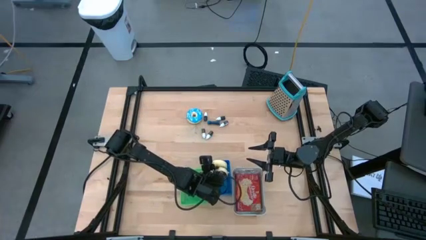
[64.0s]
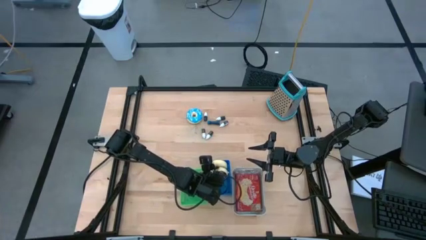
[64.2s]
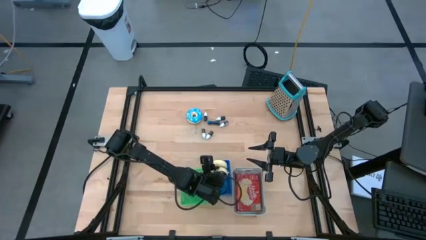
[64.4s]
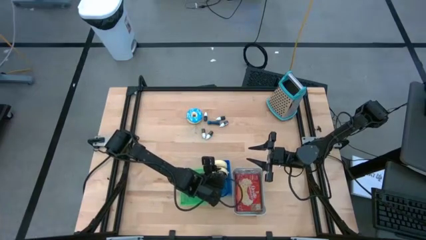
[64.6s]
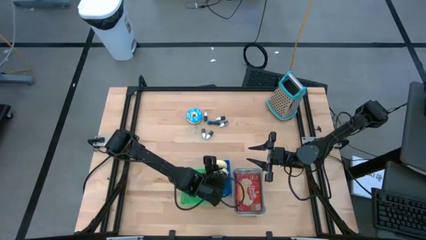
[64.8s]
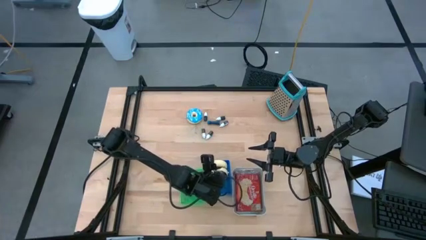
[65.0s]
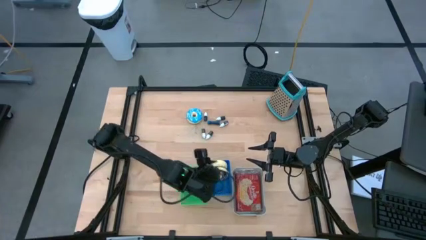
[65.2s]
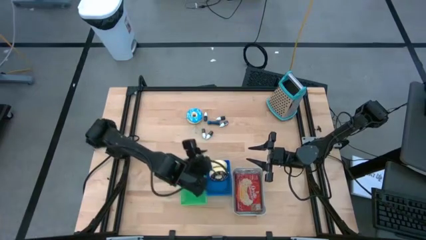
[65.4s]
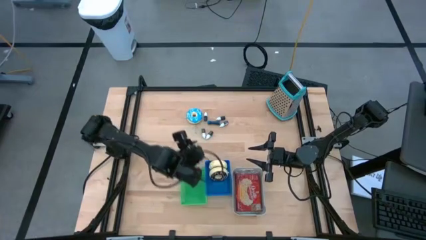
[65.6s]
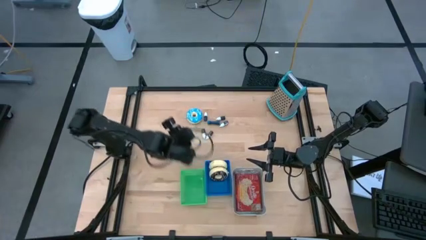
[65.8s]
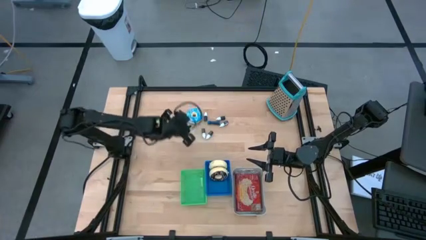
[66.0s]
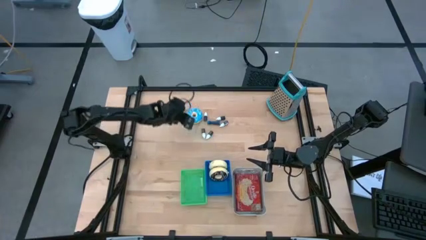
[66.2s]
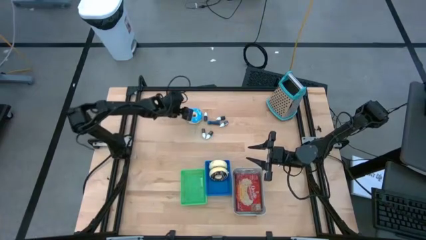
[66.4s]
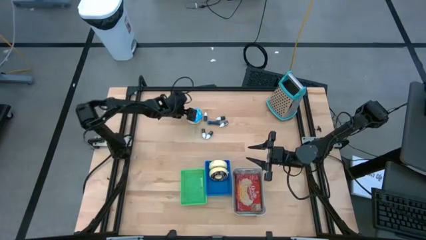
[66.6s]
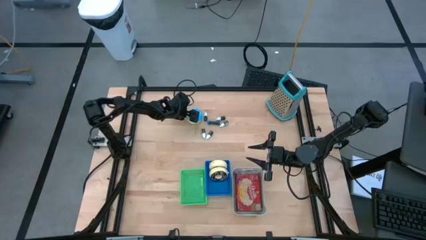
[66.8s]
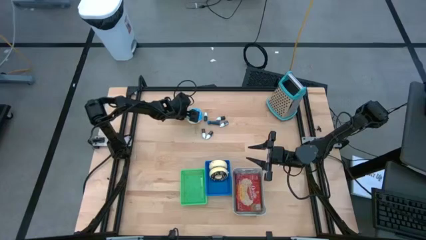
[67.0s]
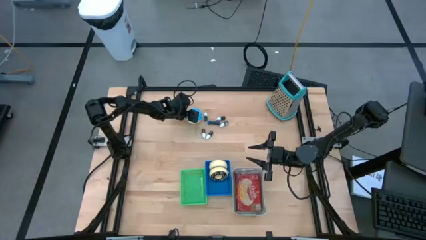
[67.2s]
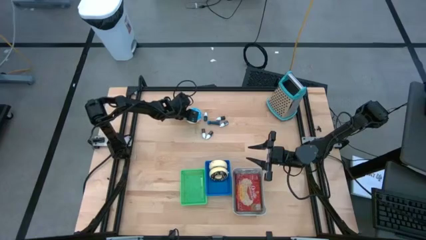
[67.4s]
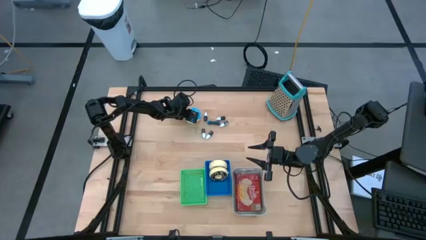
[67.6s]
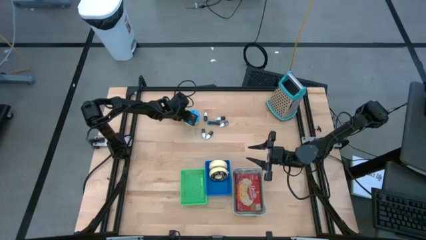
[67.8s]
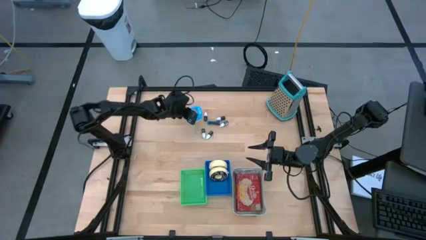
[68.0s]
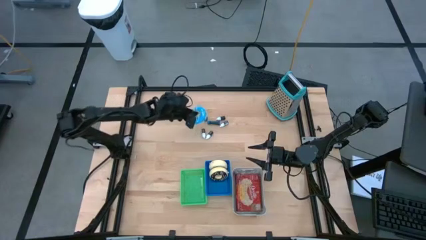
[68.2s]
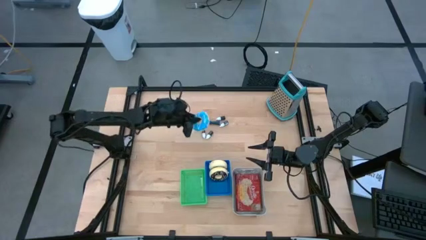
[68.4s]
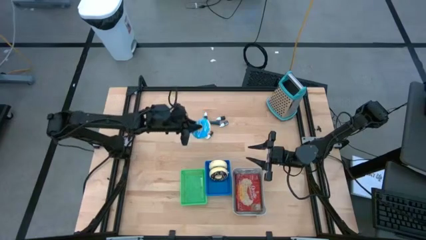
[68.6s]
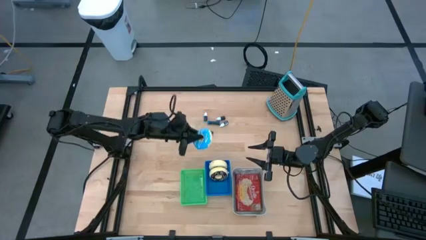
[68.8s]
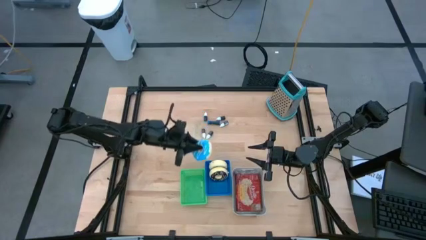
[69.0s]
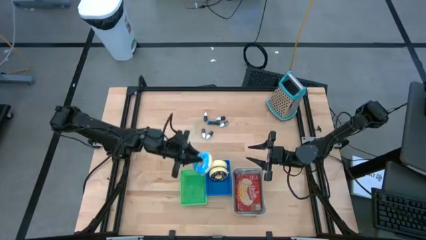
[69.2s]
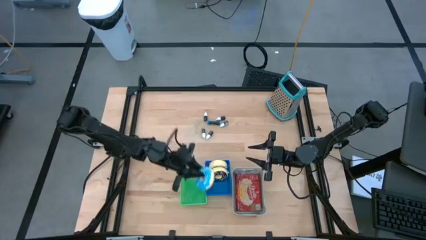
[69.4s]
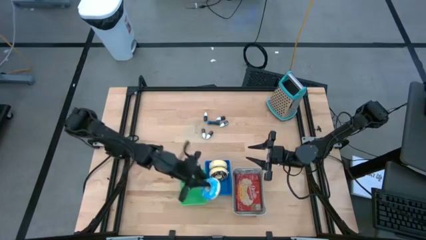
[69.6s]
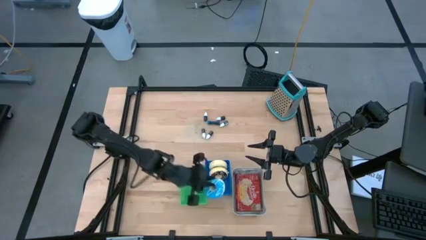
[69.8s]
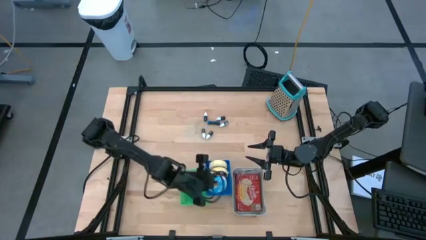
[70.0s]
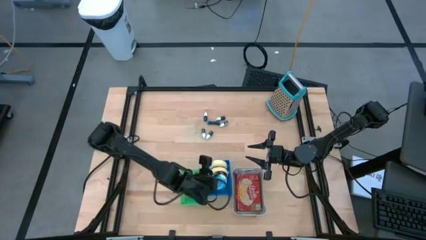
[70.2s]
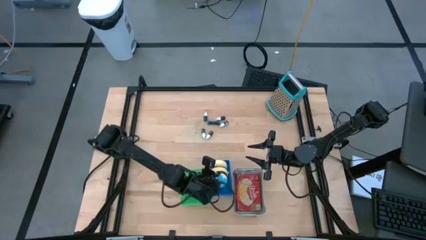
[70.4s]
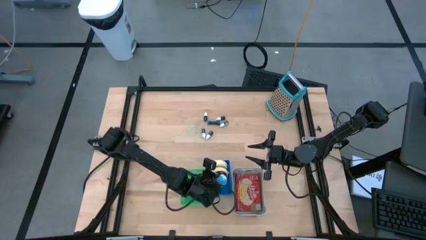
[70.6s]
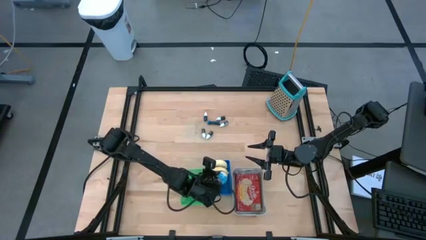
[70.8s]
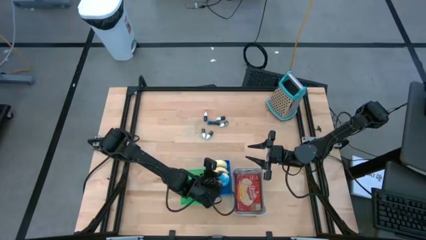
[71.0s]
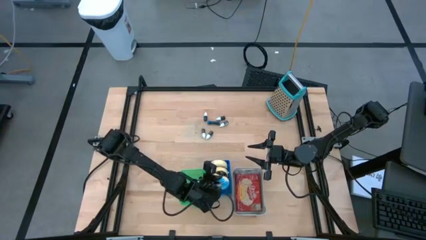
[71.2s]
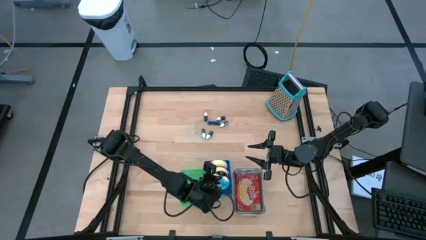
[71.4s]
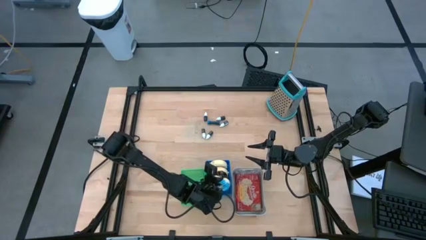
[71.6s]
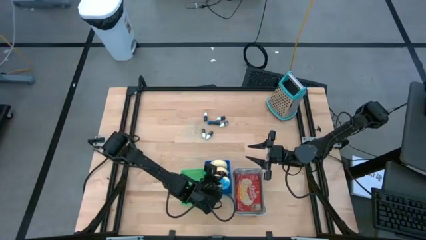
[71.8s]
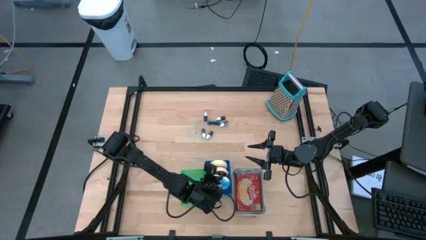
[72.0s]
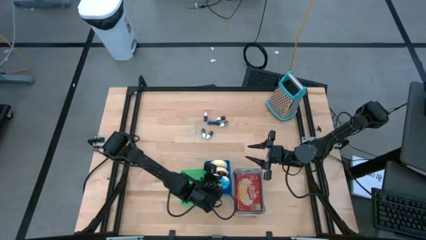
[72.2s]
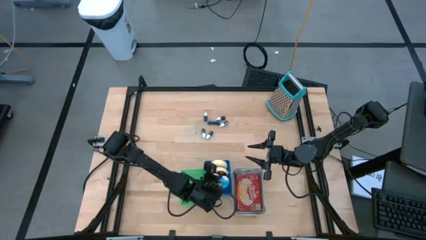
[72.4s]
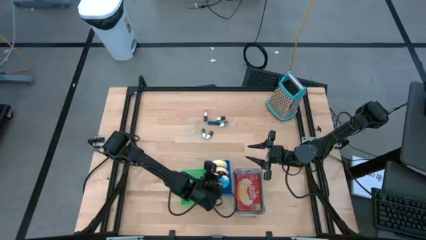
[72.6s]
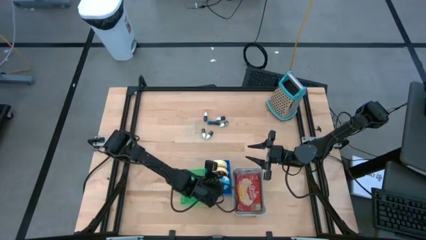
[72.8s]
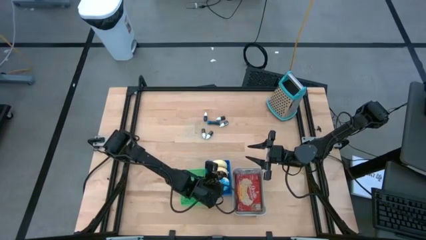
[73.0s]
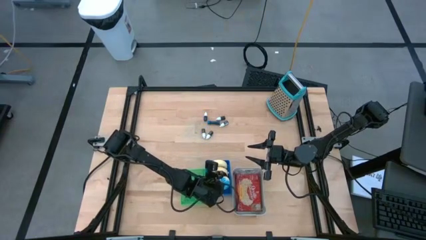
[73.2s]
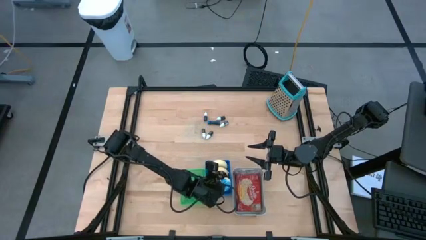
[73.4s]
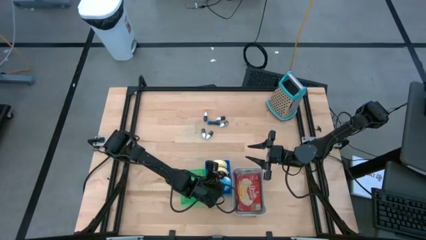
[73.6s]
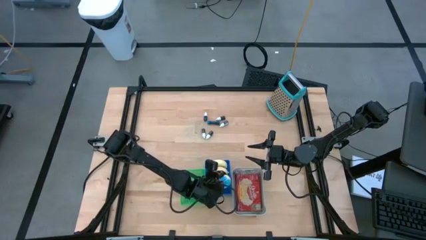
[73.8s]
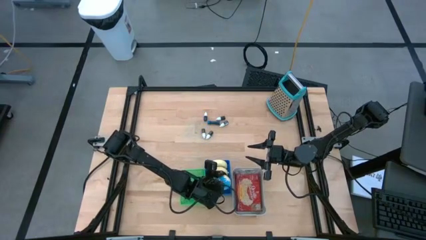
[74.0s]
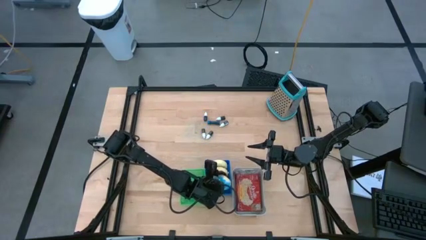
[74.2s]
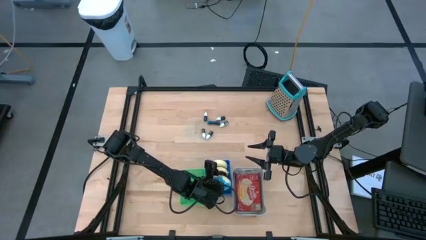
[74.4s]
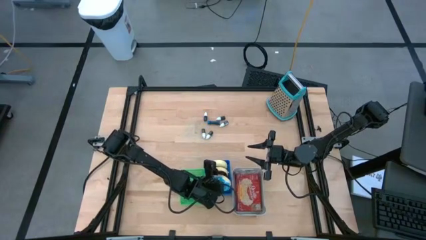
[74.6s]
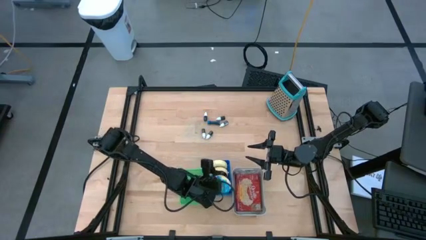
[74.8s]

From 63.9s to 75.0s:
Put the blue doughnut into the blue bin

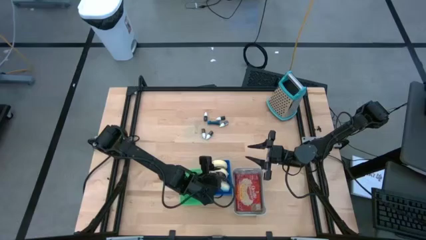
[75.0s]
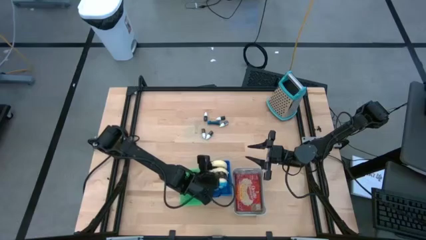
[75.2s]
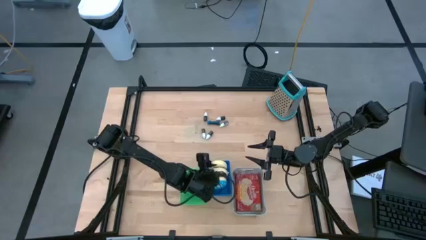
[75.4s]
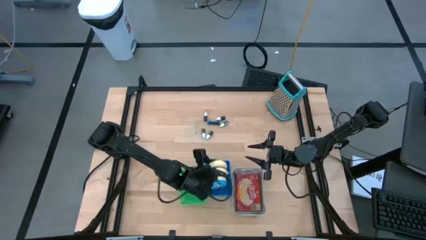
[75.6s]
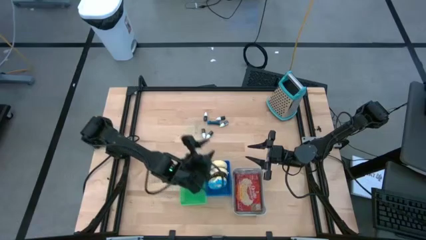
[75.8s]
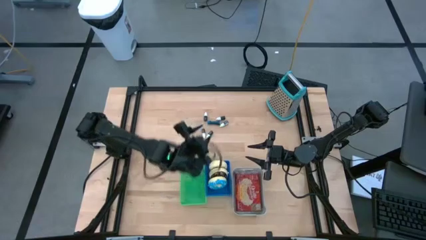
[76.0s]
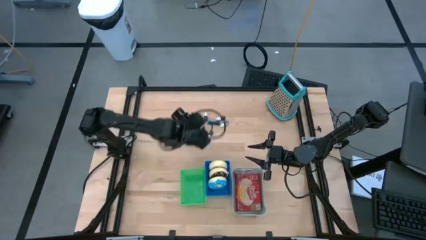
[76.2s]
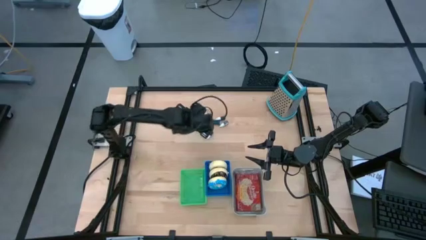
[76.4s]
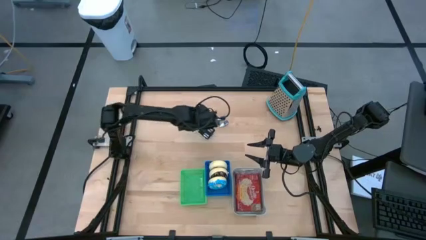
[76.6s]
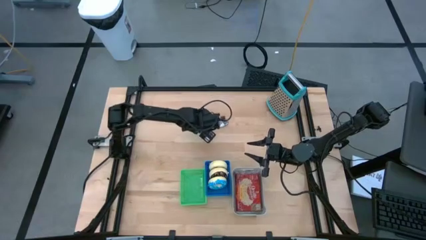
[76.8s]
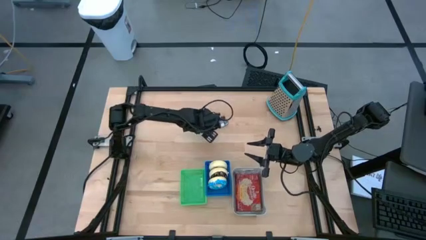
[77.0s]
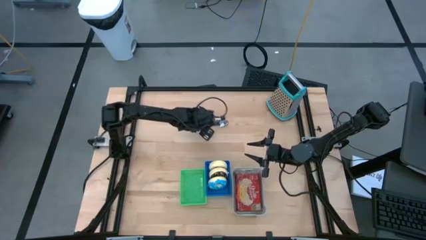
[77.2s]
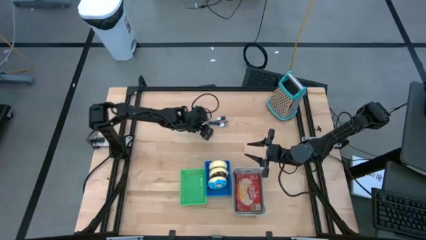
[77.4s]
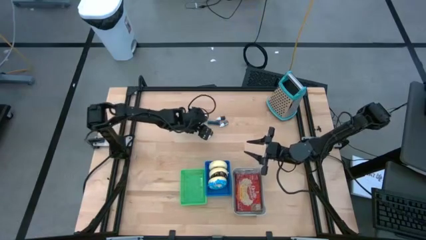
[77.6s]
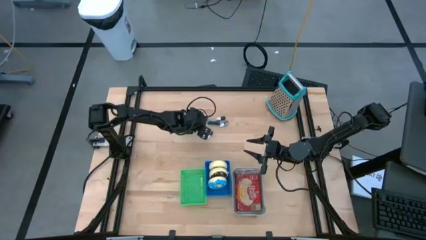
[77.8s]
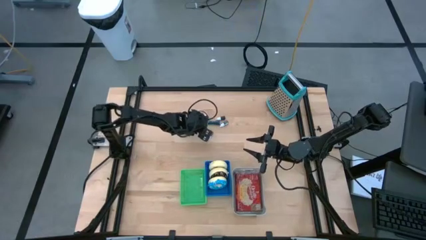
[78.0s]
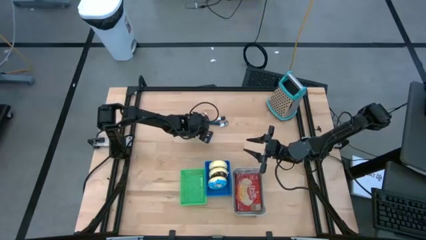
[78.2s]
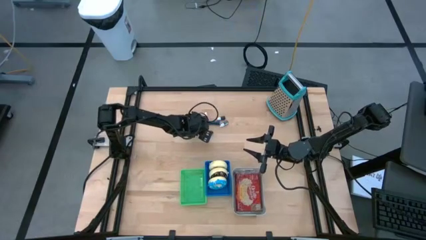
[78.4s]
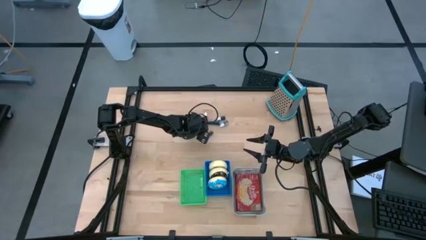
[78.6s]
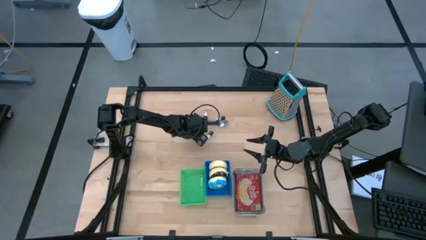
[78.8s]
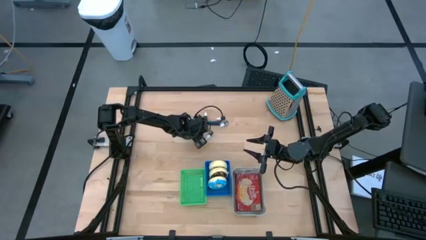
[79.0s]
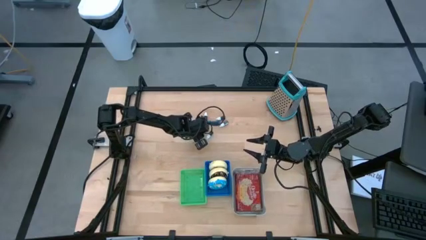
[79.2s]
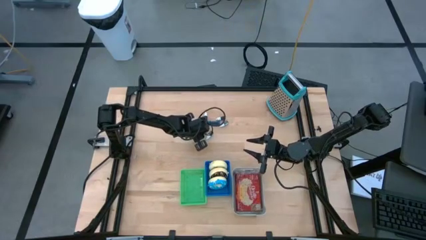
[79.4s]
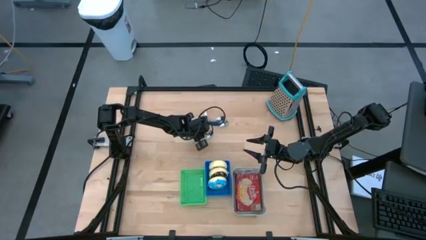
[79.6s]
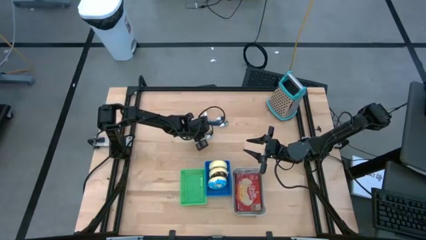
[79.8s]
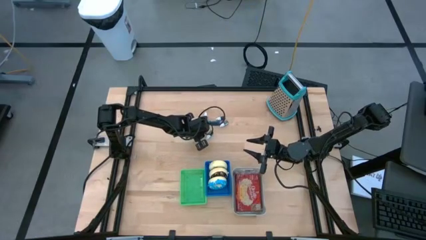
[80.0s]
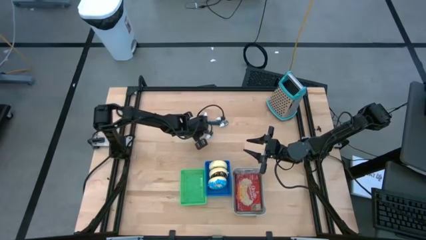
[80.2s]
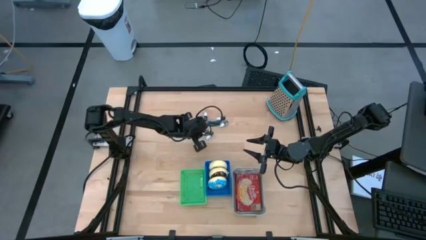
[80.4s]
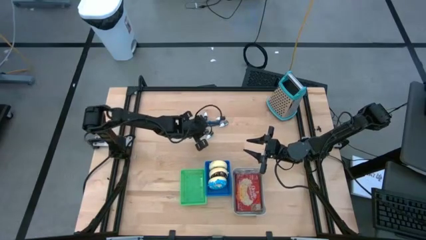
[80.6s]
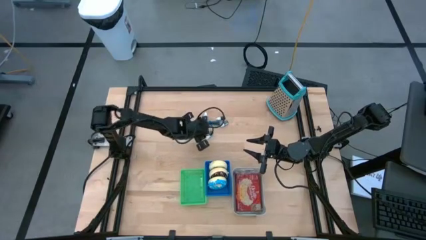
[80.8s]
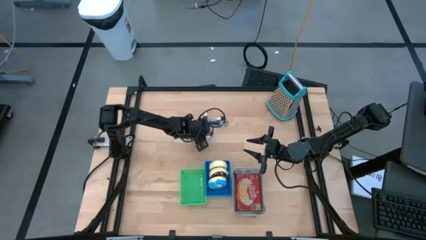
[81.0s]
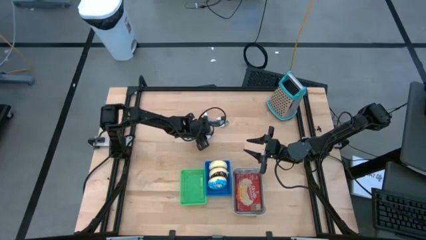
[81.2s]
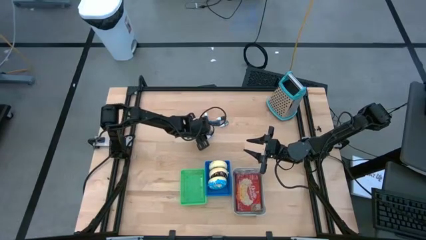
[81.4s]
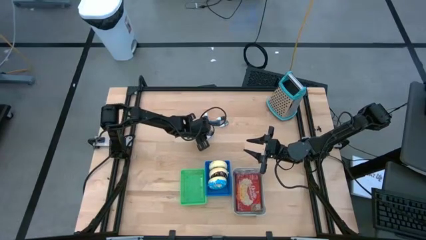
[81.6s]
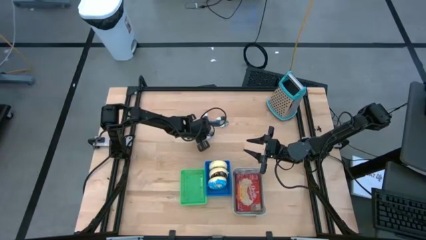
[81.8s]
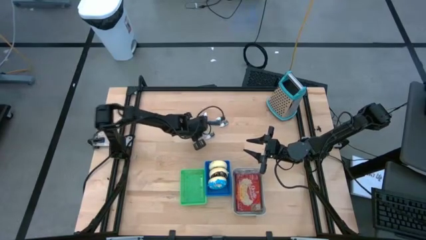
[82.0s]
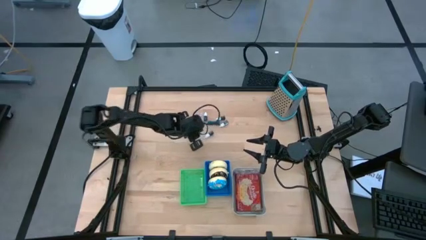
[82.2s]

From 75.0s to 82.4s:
Put the brown food coloring bottle into the green bin
